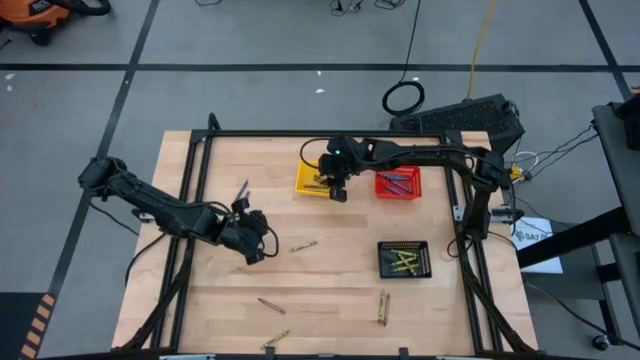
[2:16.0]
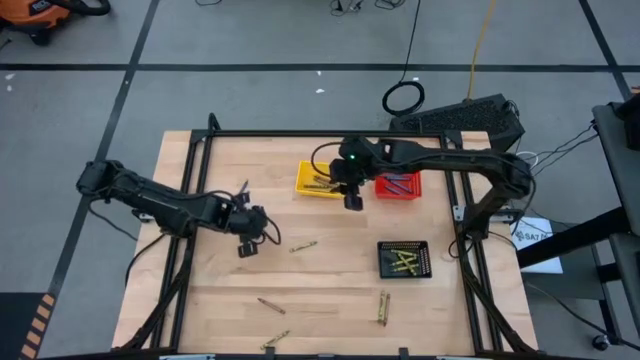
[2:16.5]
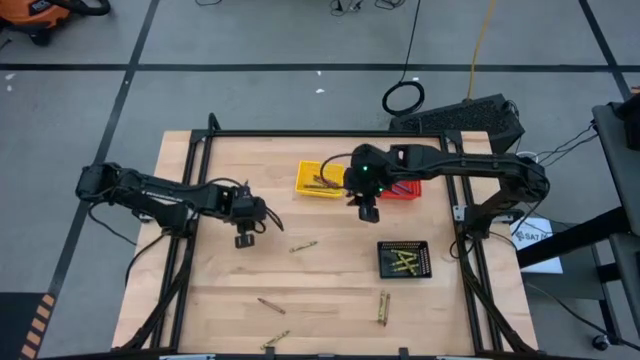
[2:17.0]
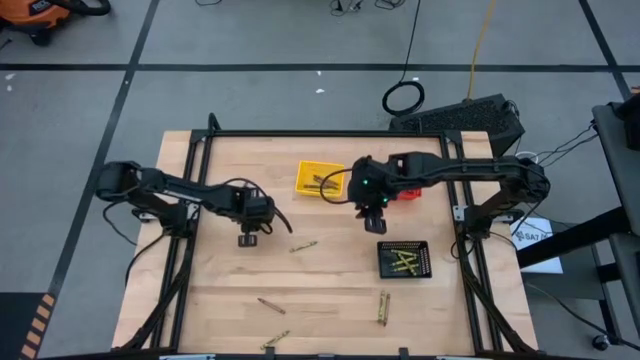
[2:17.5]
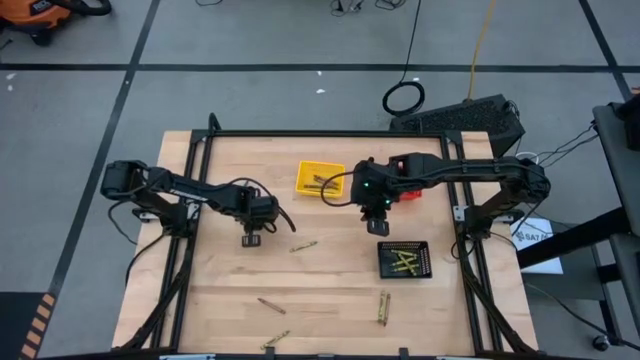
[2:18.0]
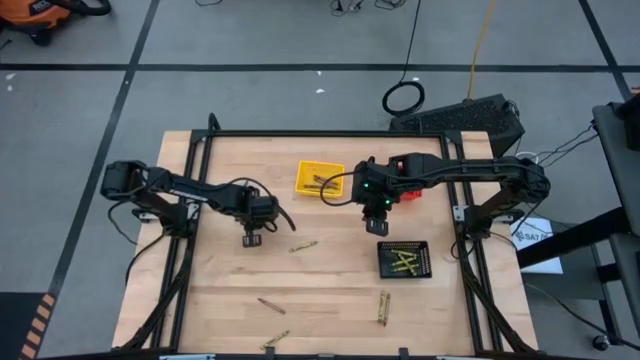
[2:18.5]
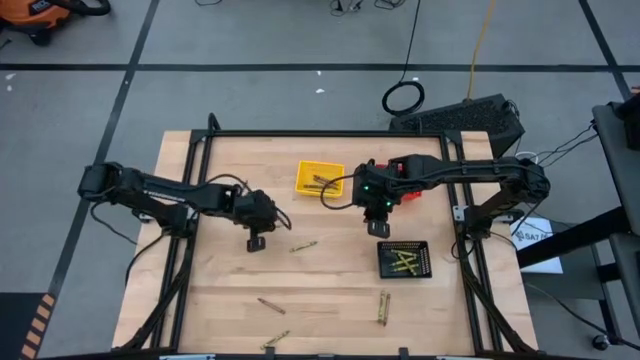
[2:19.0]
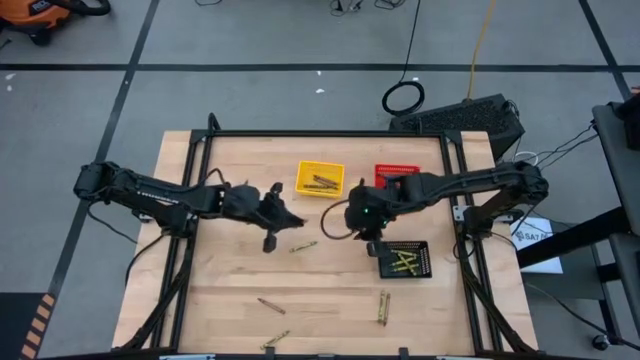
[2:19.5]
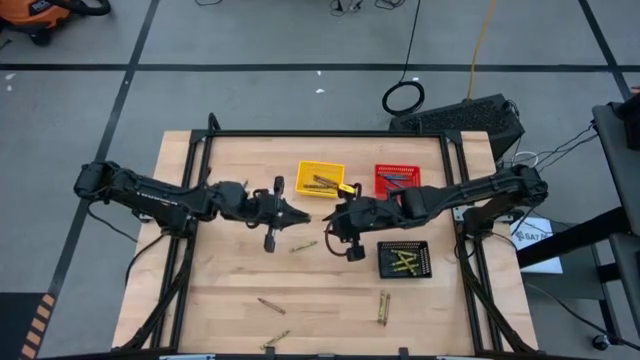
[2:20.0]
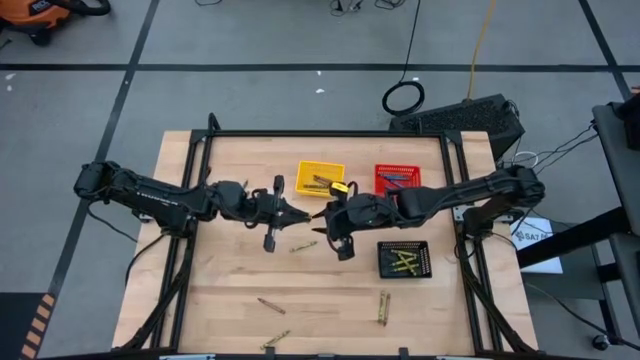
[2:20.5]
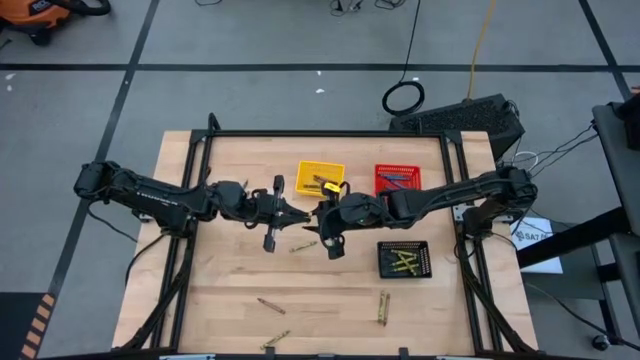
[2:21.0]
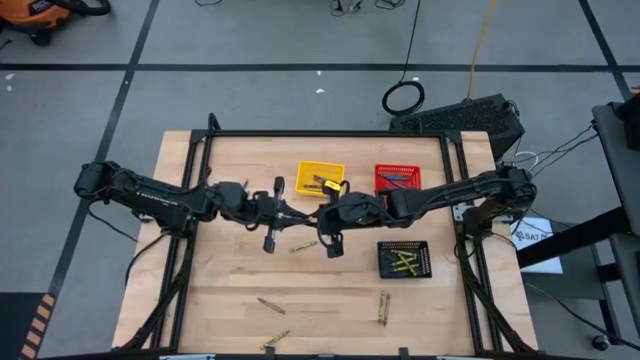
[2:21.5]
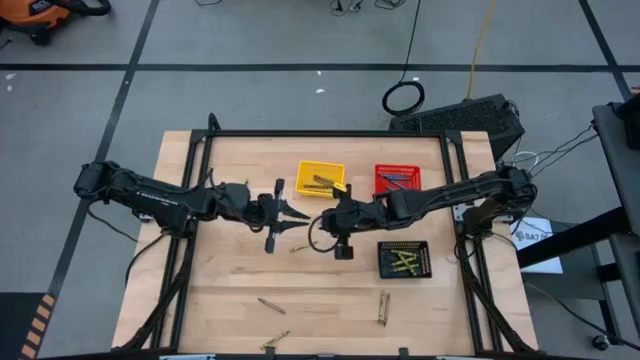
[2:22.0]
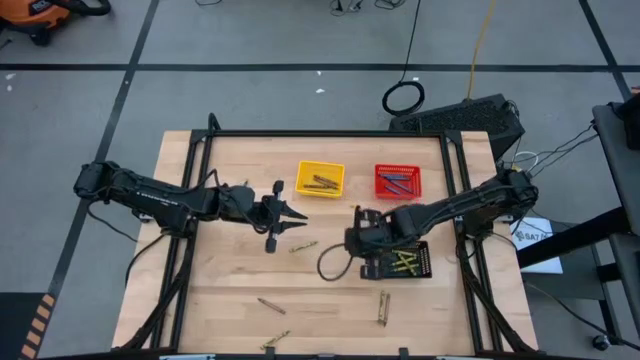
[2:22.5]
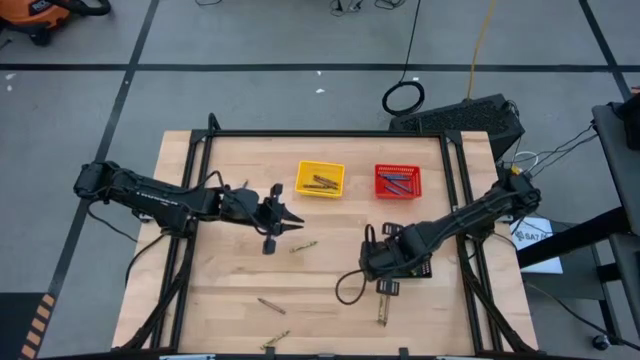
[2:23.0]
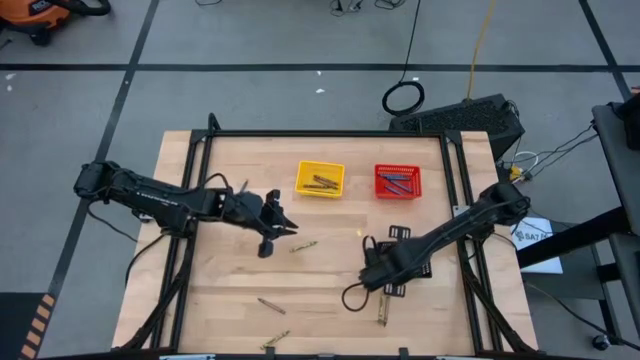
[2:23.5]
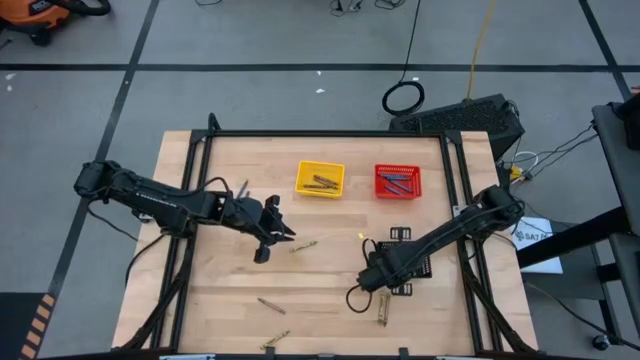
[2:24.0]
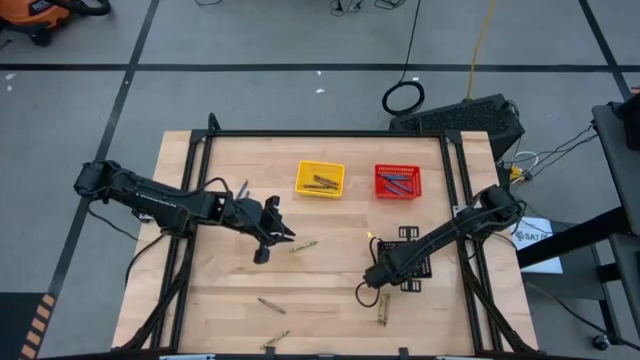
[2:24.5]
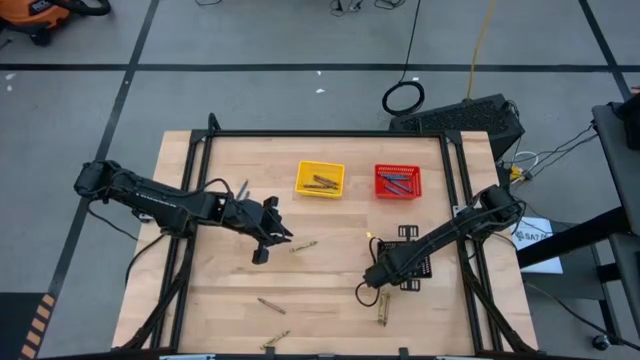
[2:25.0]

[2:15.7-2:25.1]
Task: Sort crayons
Put the green crayon into the black bin

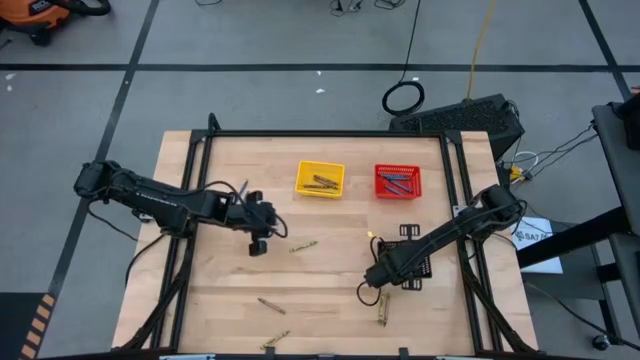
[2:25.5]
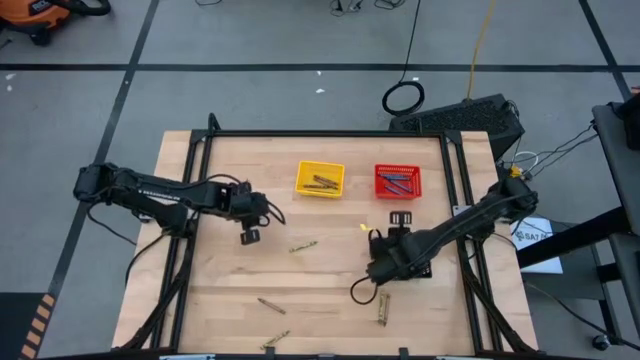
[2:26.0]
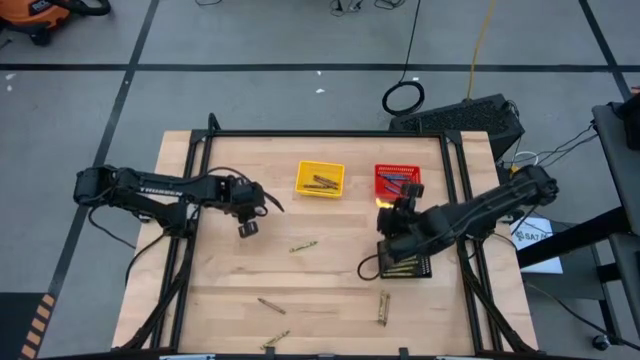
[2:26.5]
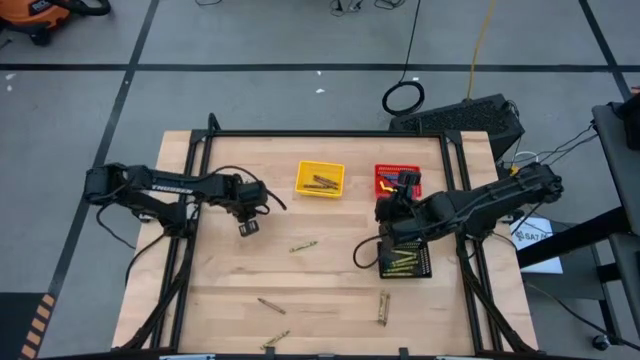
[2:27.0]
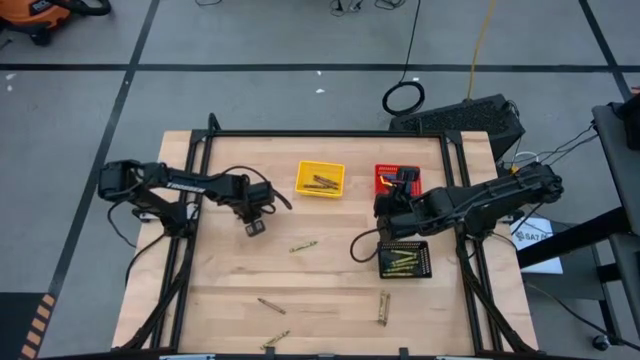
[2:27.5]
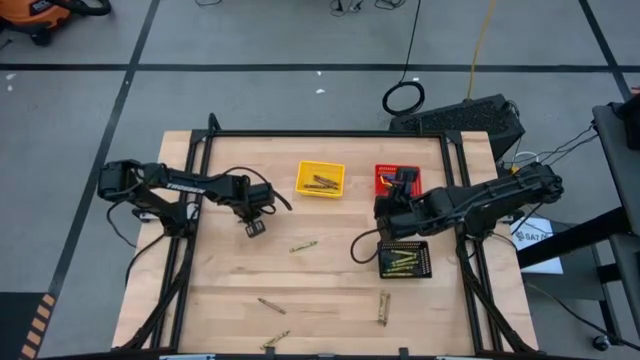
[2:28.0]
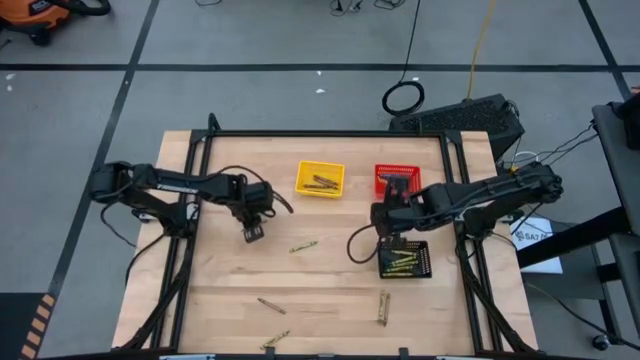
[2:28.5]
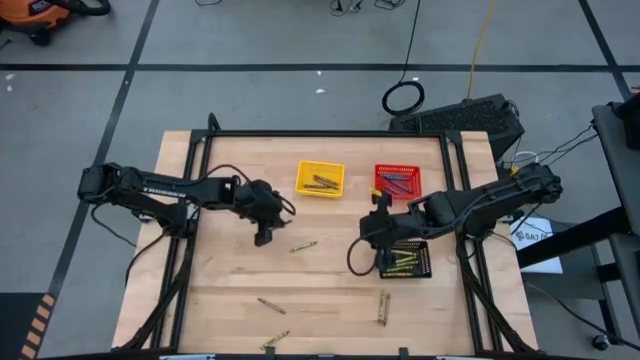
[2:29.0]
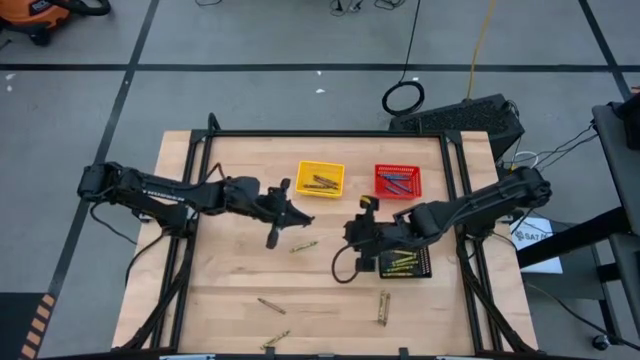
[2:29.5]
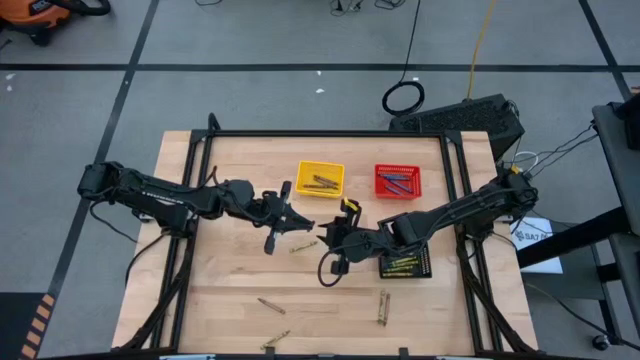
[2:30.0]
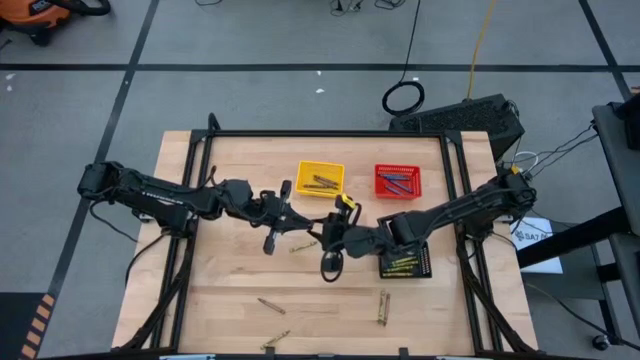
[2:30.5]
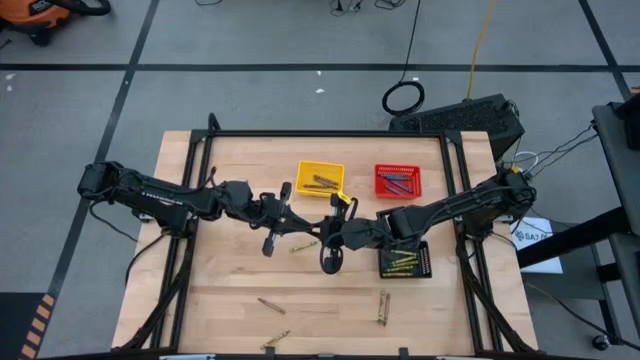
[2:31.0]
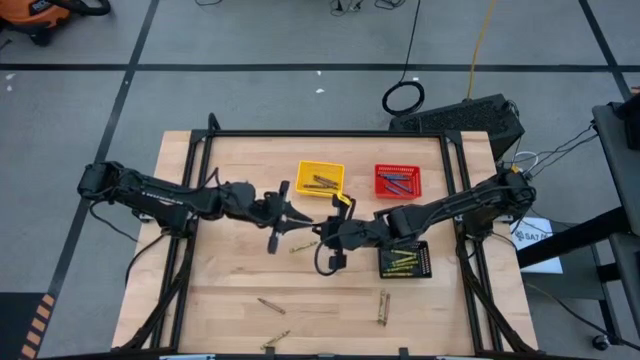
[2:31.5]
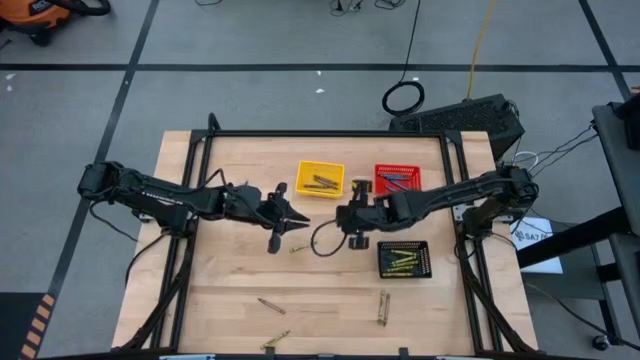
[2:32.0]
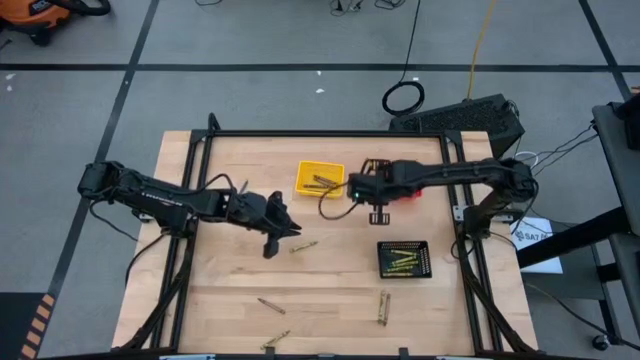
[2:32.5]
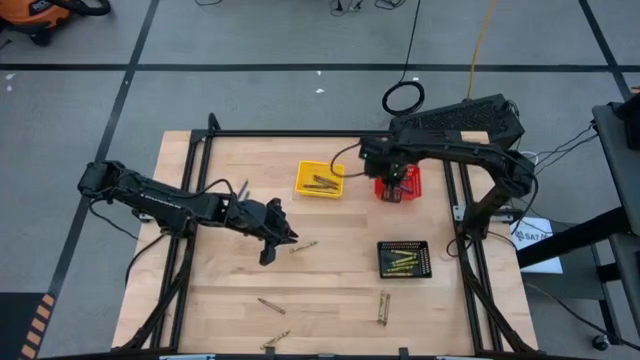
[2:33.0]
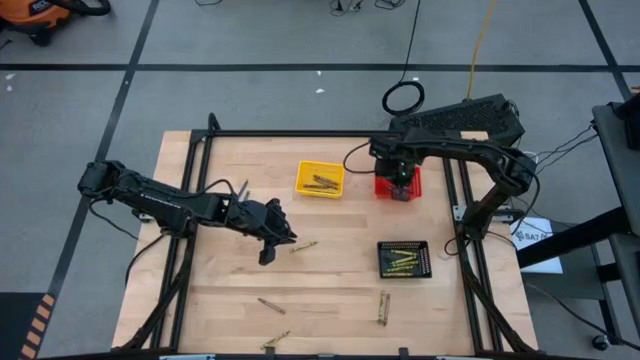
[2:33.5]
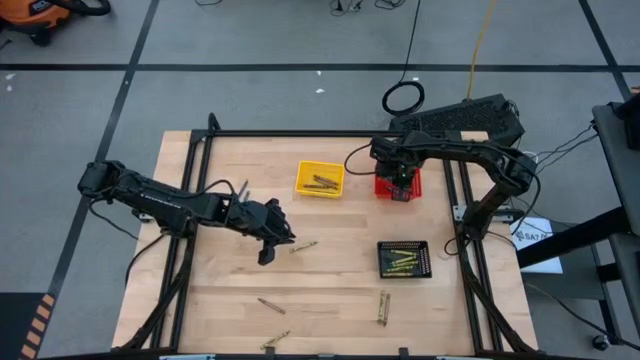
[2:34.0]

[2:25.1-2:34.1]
Put the blue crayon into the red bin

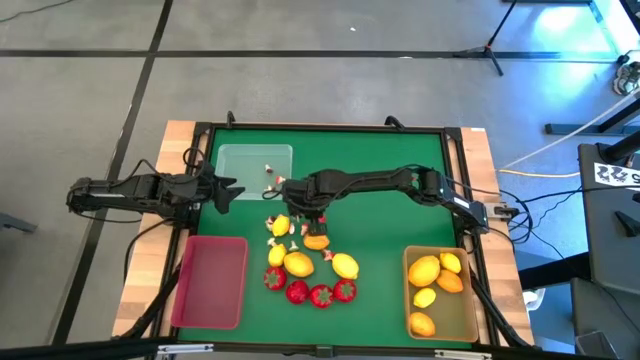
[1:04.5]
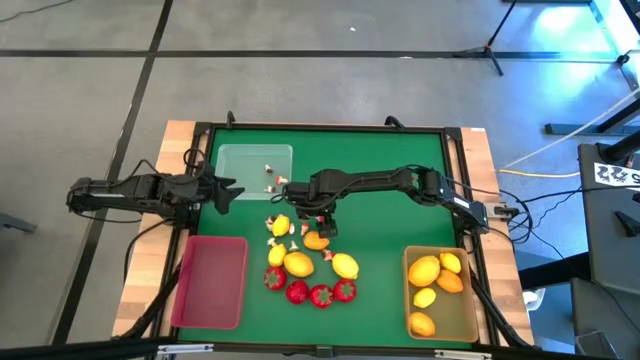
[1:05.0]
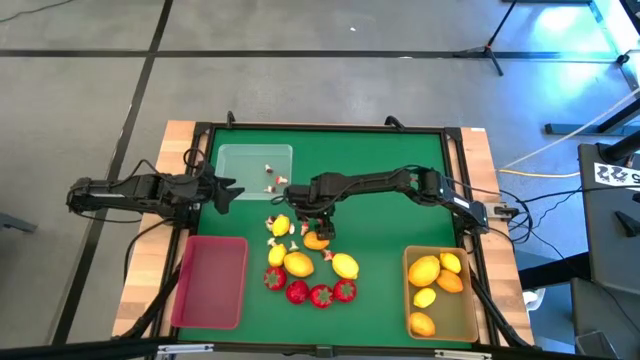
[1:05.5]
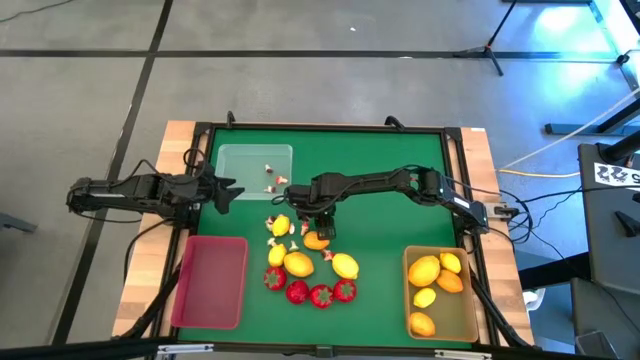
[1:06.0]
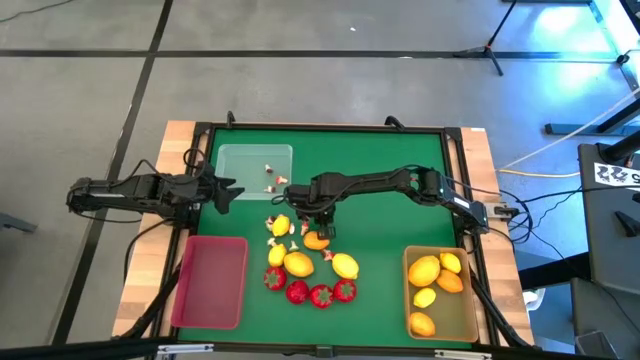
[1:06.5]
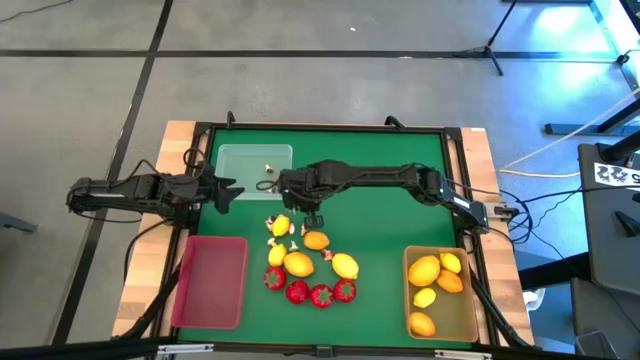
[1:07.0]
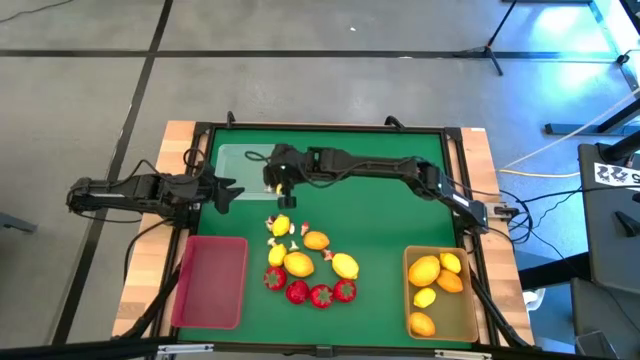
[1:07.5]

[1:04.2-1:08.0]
Task: Sort produce into baskets
Put the red mushroom into the transparent bin
